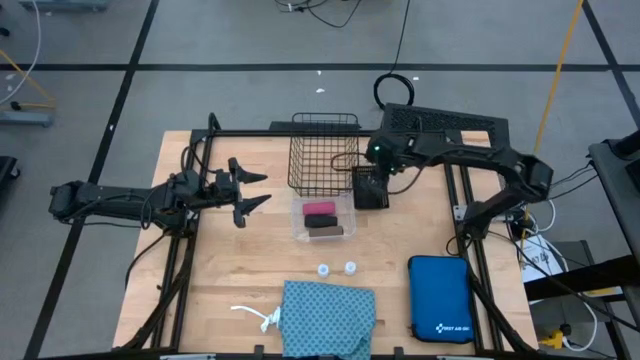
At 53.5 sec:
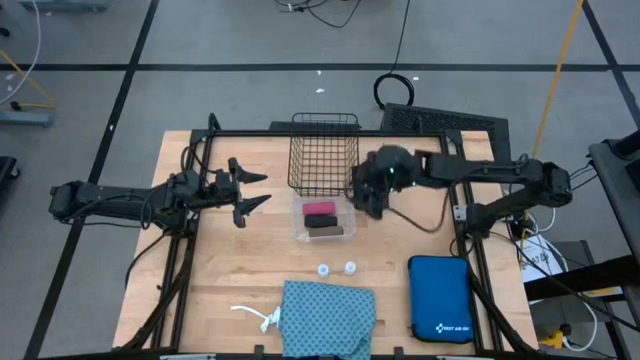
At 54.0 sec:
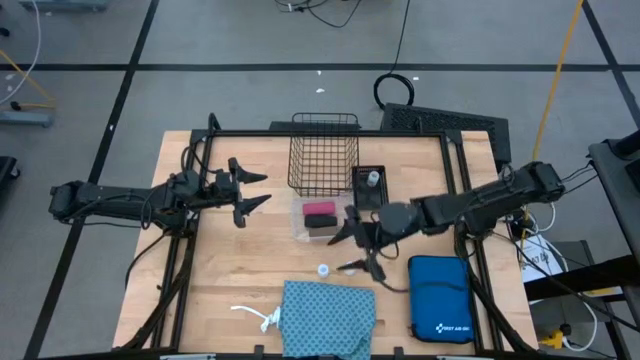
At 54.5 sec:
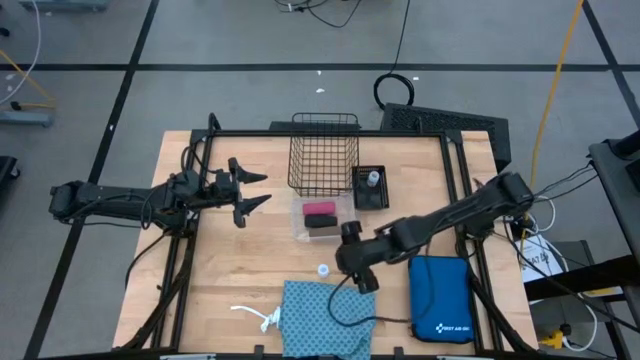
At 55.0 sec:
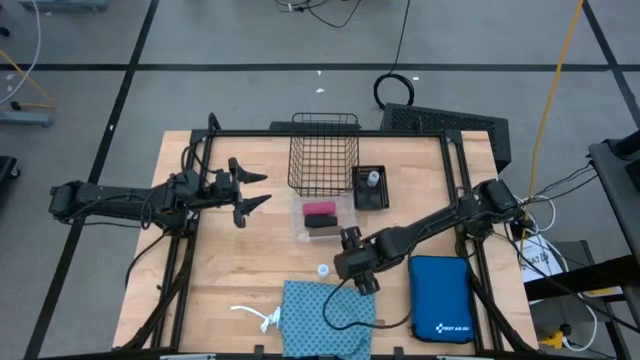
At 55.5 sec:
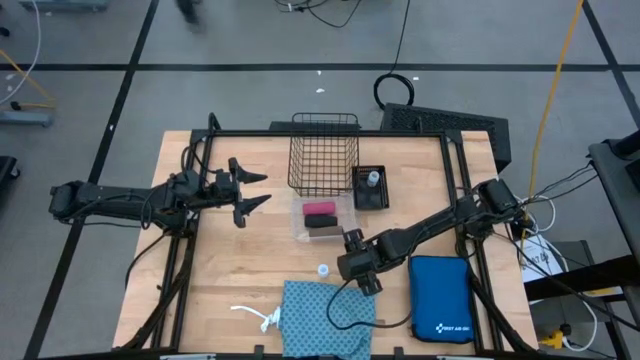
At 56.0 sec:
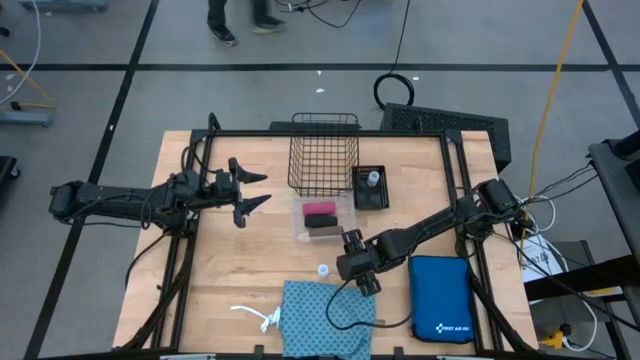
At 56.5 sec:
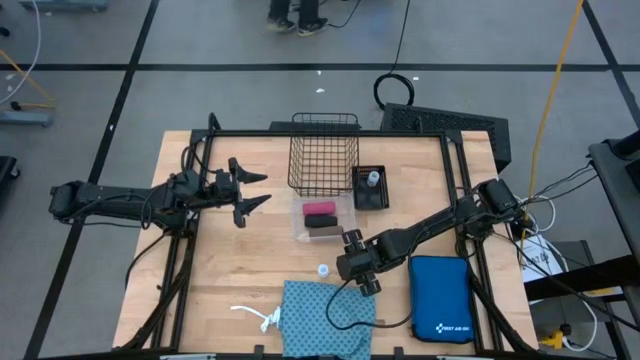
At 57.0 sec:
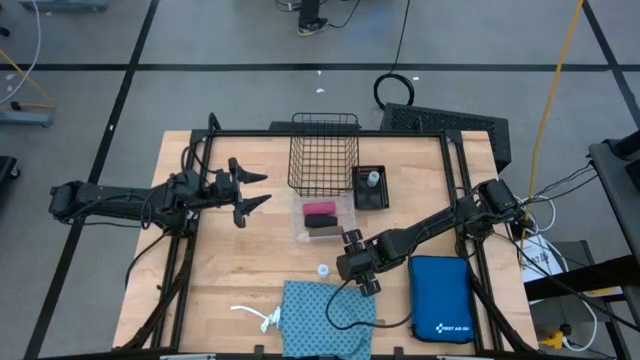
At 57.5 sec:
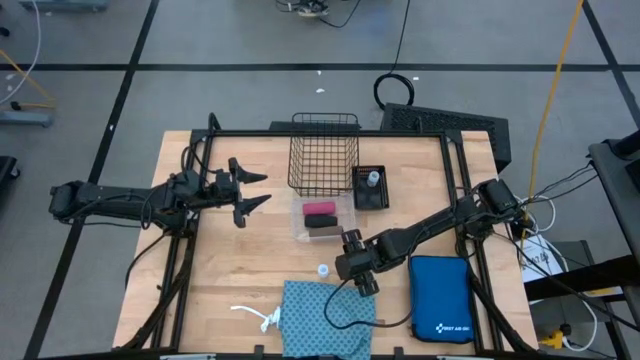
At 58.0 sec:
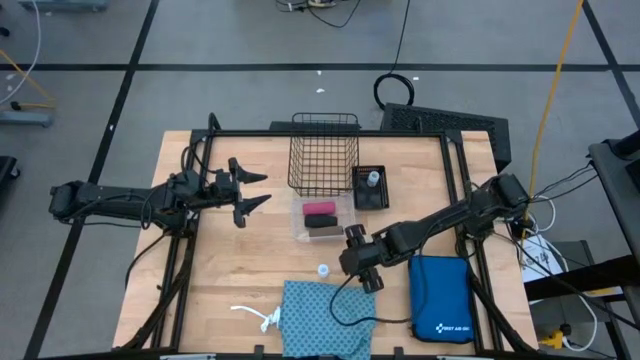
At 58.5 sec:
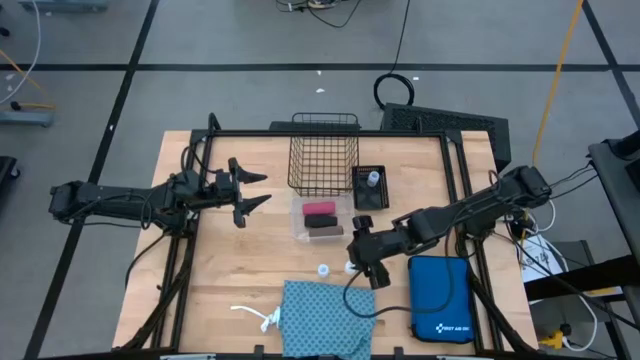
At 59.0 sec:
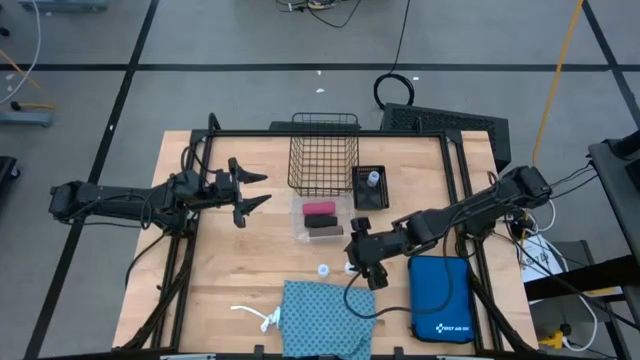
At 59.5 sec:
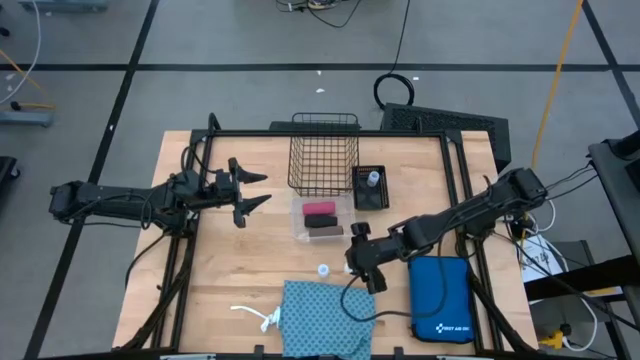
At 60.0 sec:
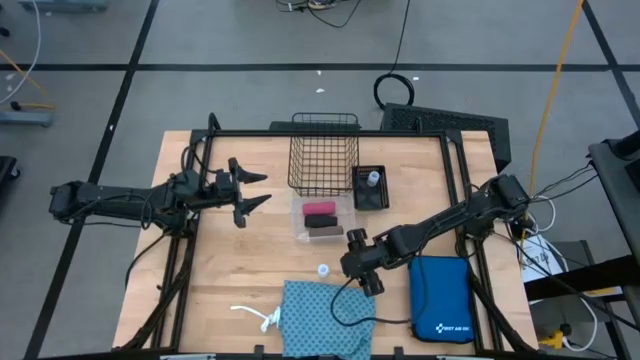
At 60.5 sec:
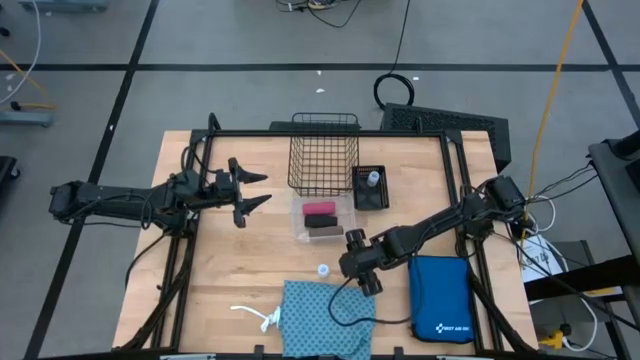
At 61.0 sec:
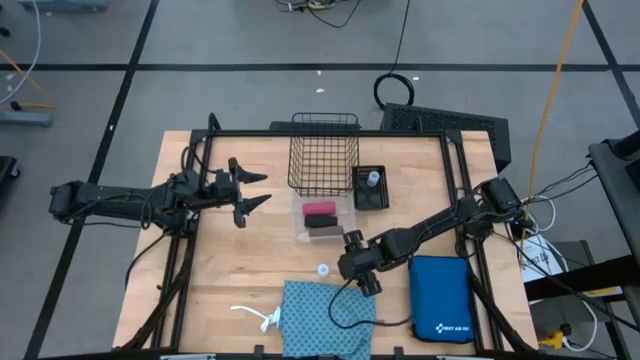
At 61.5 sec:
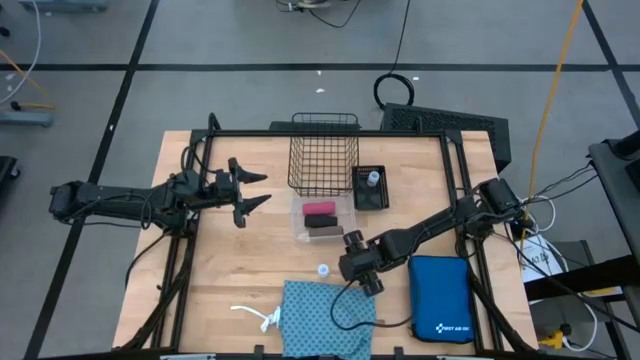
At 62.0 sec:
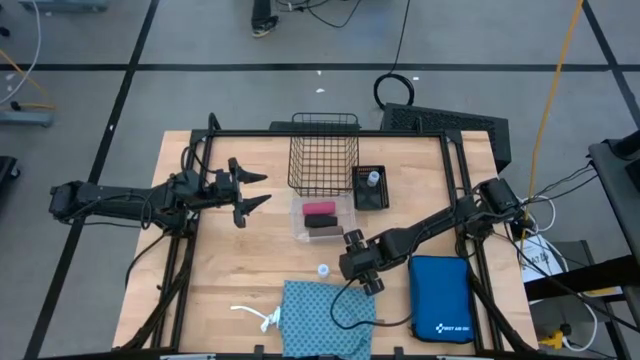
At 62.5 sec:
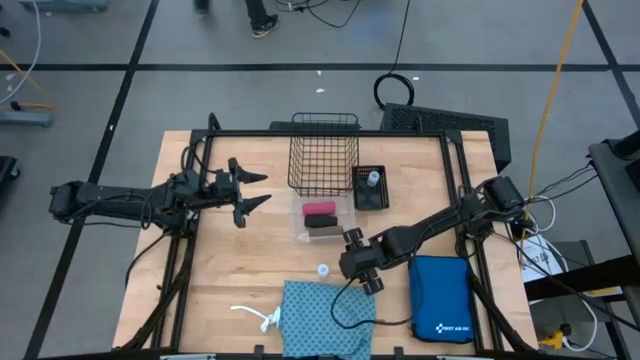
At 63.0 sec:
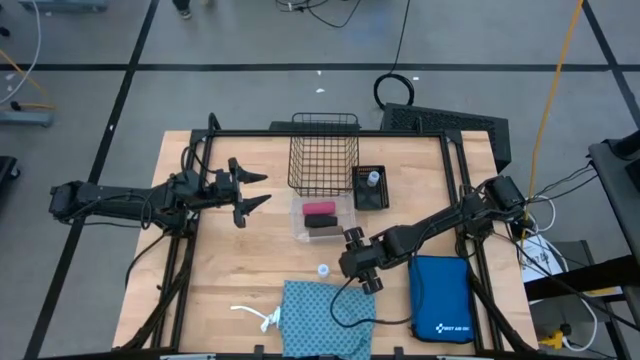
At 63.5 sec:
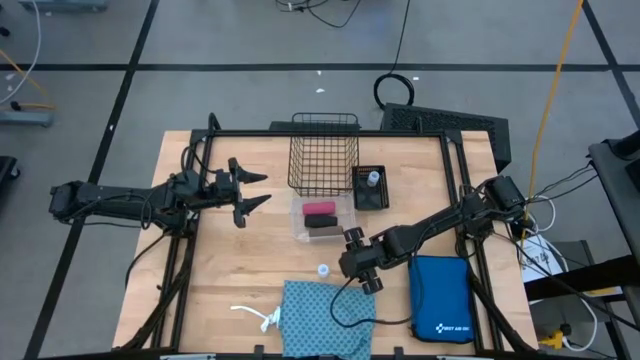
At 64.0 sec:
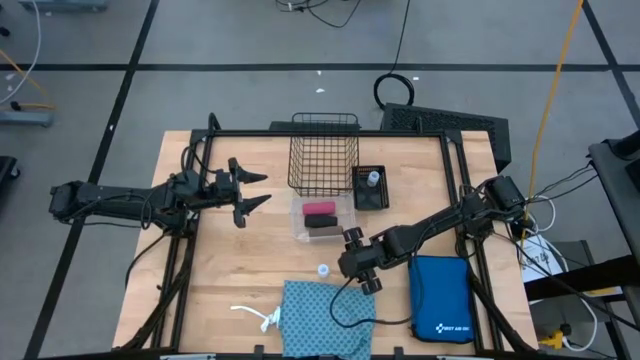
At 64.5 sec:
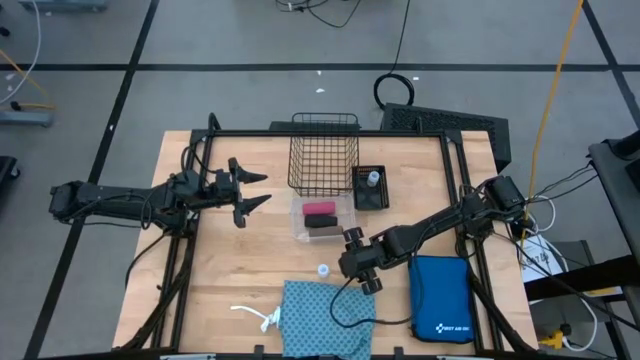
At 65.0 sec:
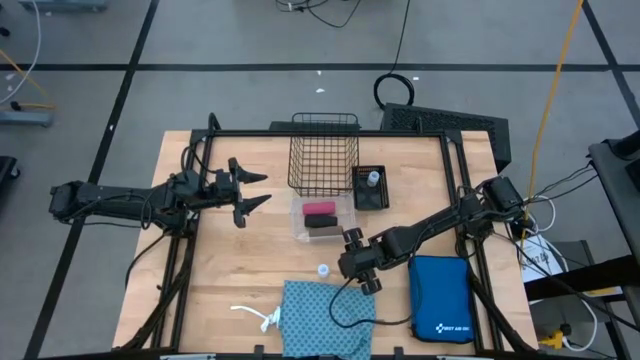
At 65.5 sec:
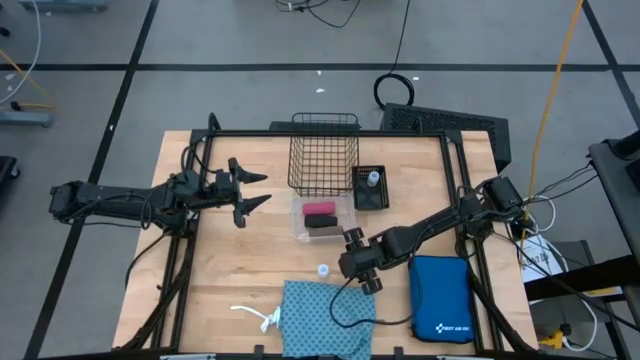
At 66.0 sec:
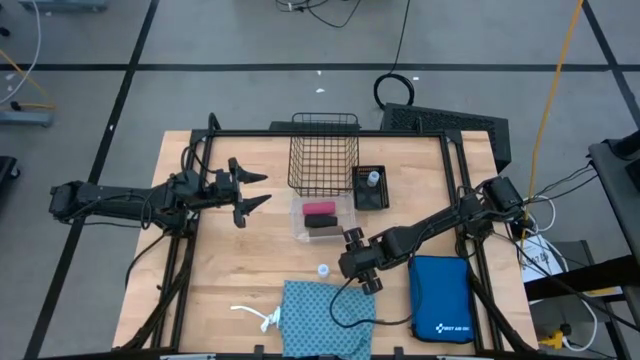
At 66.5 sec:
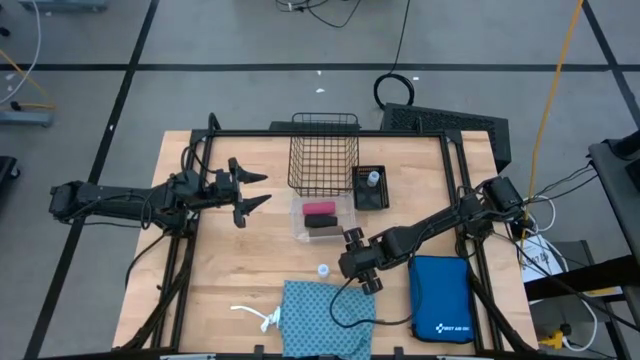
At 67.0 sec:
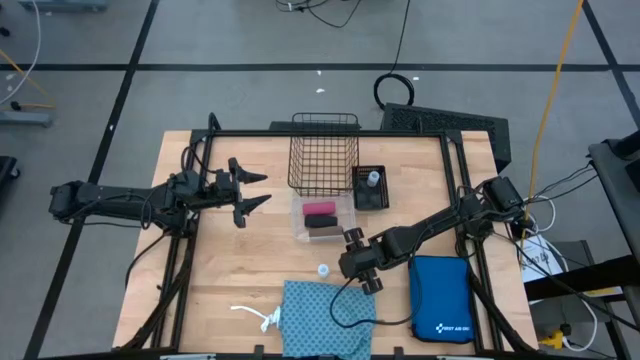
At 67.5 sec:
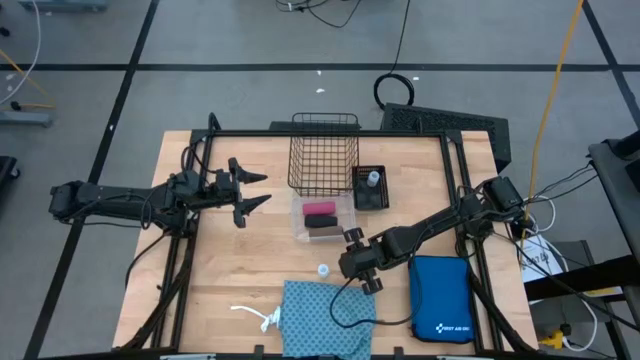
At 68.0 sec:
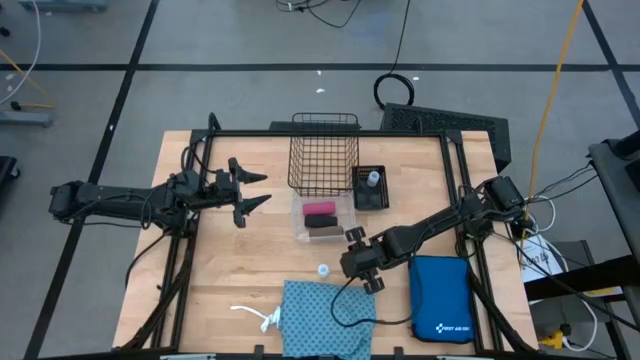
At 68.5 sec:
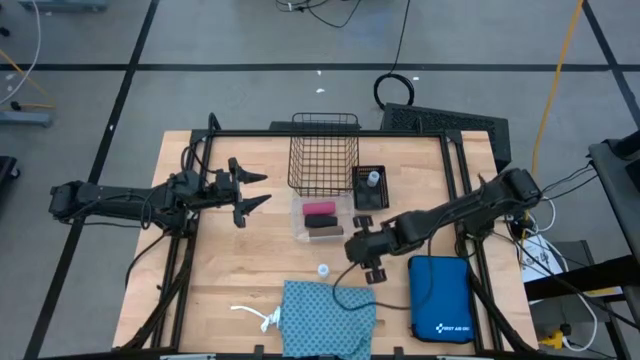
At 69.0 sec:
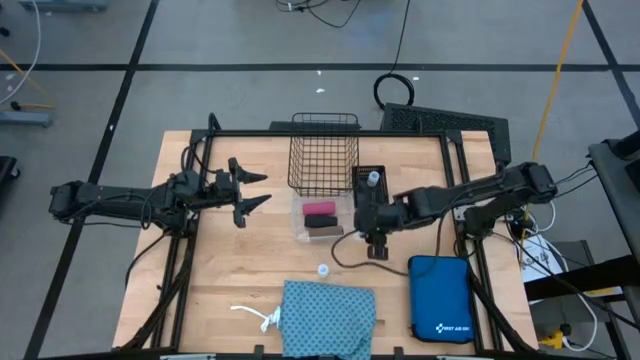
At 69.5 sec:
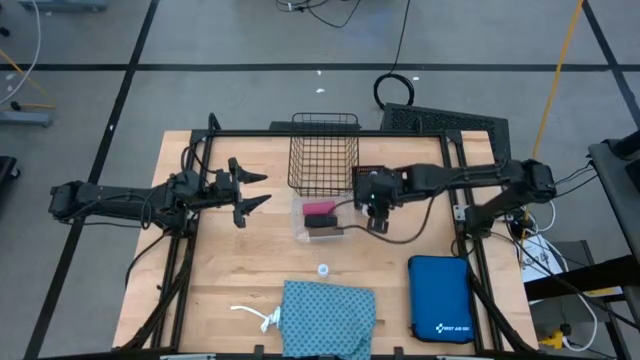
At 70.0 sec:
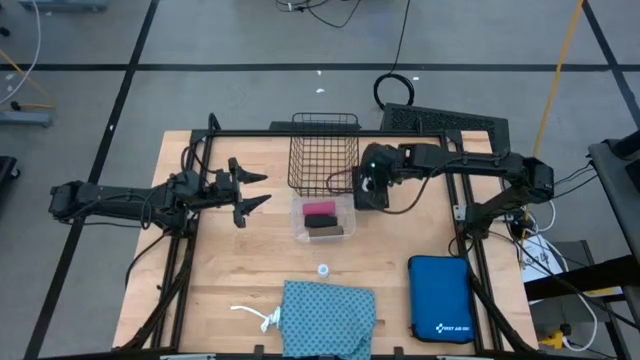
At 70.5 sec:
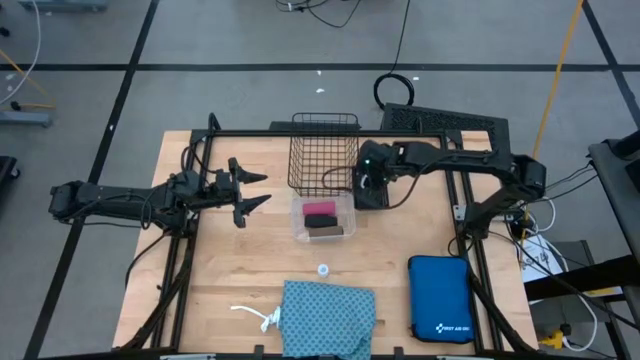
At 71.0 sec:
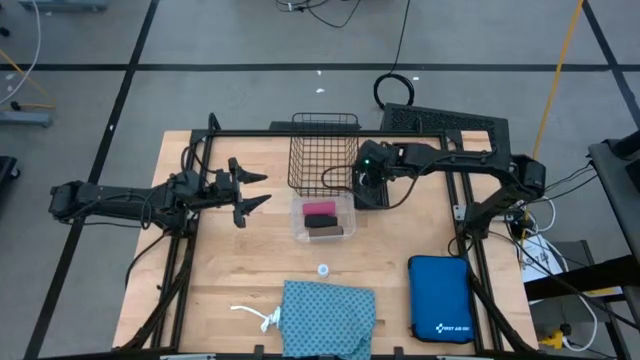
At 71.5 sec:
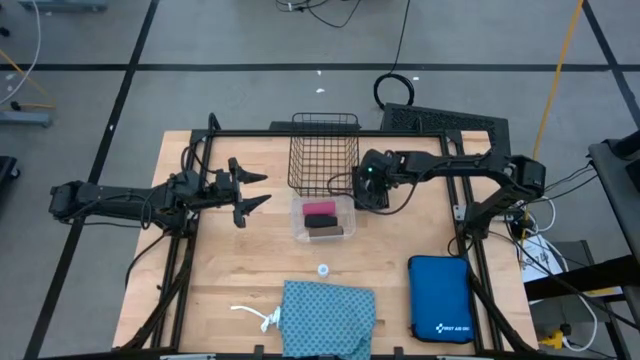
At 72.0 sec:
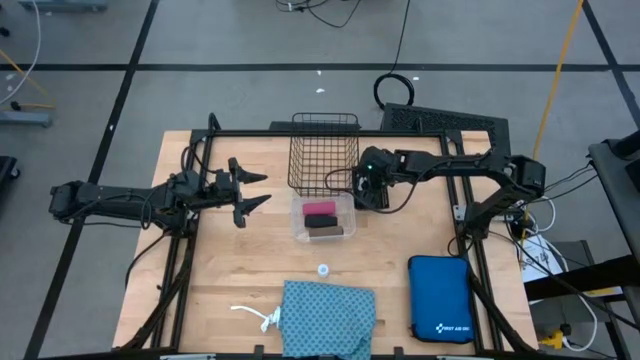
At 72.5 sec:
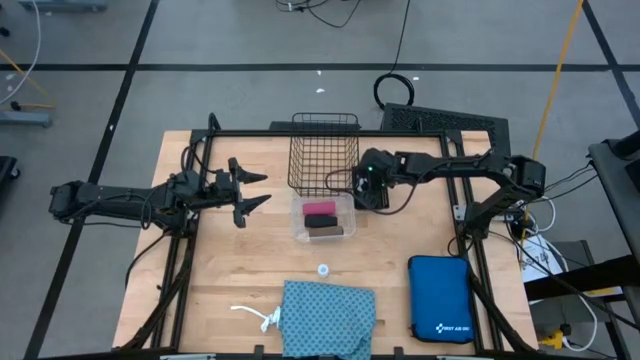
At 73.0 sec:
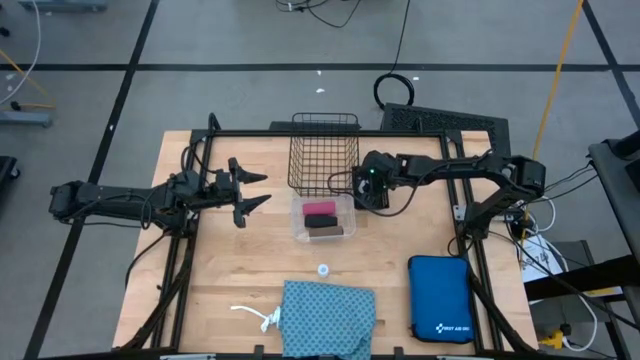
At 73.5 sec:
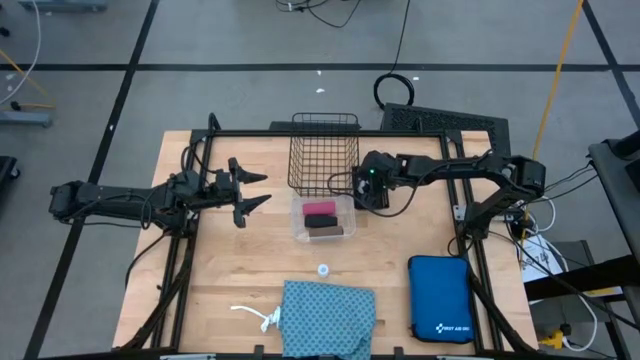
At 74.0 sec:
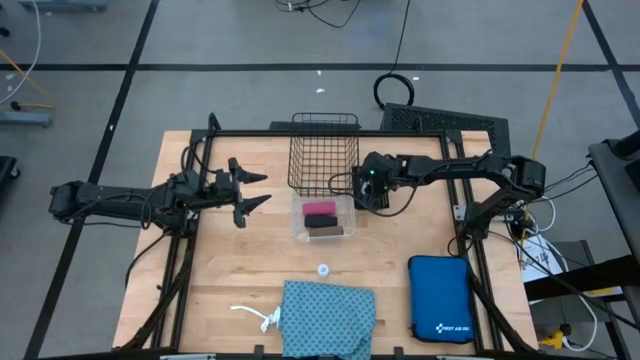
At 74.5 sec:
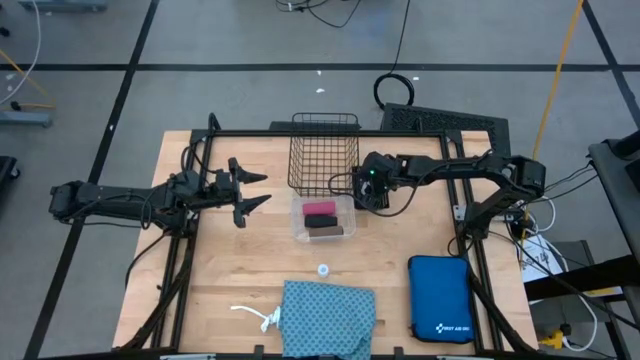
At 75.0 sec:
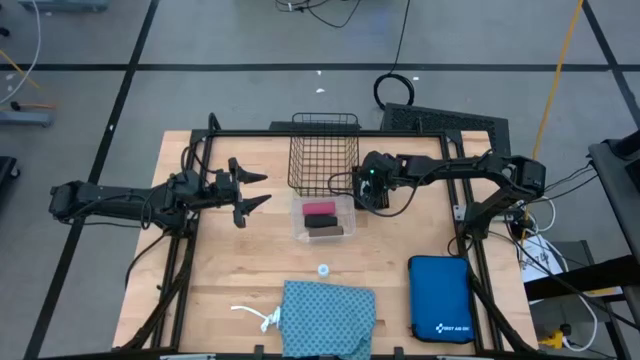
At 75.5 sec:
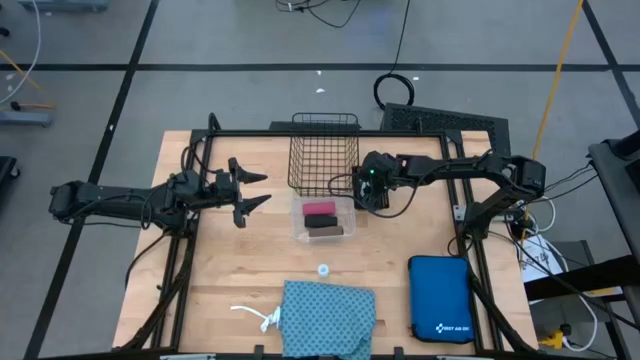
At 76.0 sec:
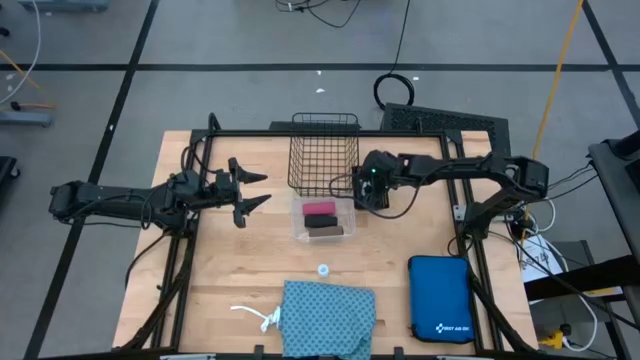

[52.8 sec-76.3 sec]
Task: Pick & Place Medicine items
Put the right transparent medicine bottle into the black bin
